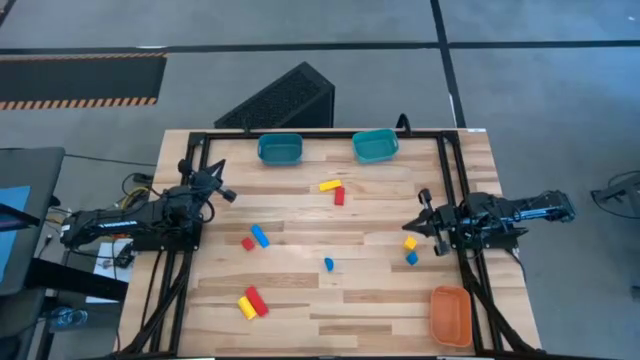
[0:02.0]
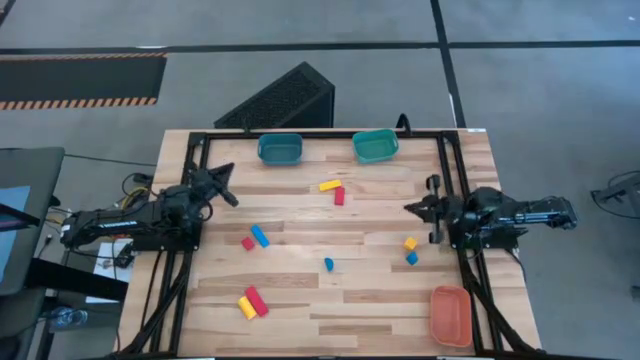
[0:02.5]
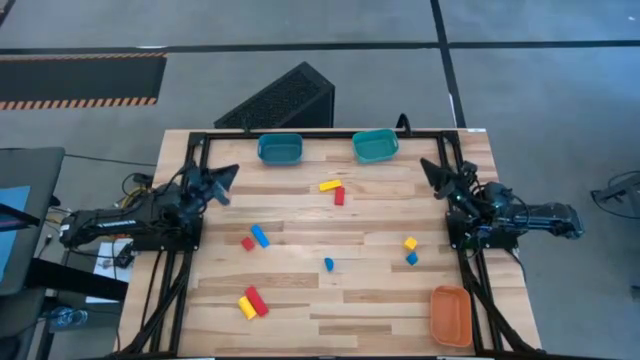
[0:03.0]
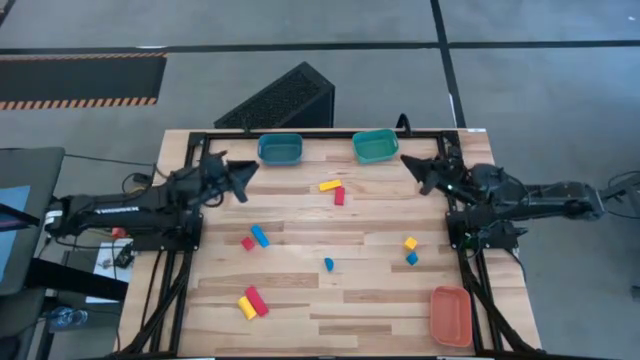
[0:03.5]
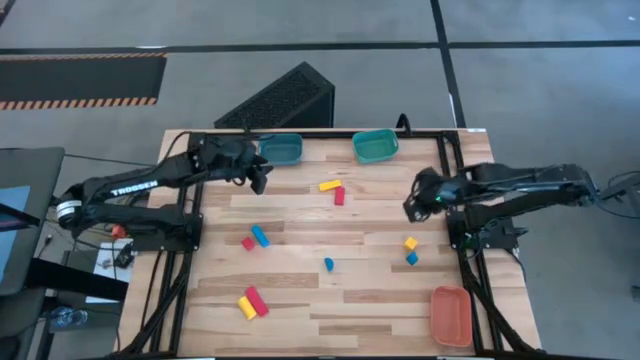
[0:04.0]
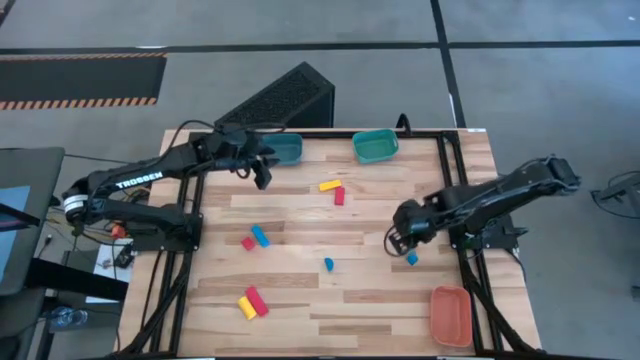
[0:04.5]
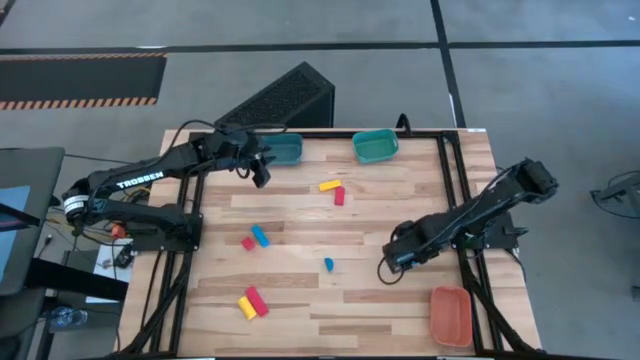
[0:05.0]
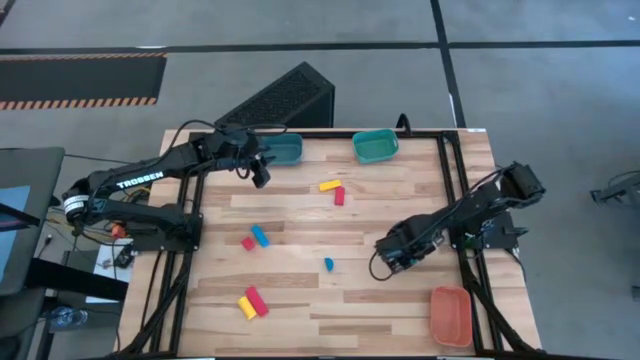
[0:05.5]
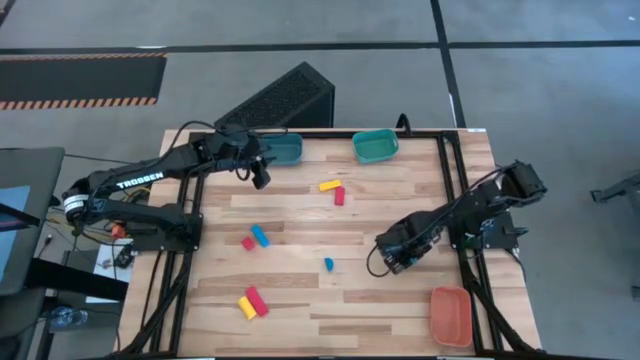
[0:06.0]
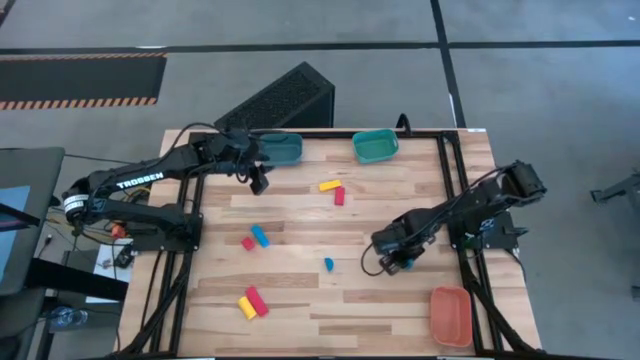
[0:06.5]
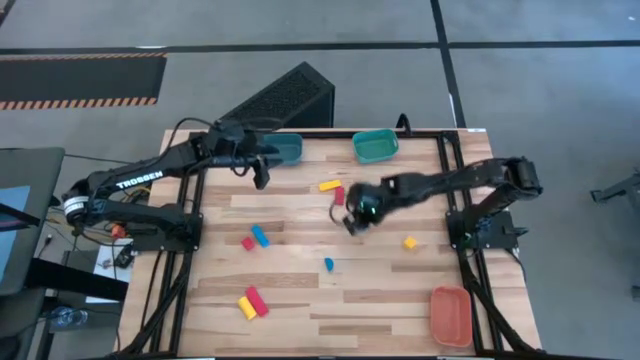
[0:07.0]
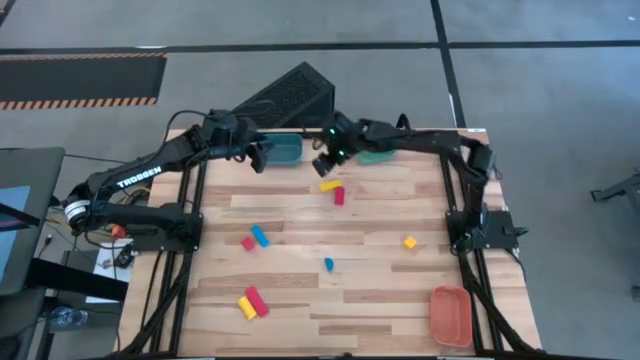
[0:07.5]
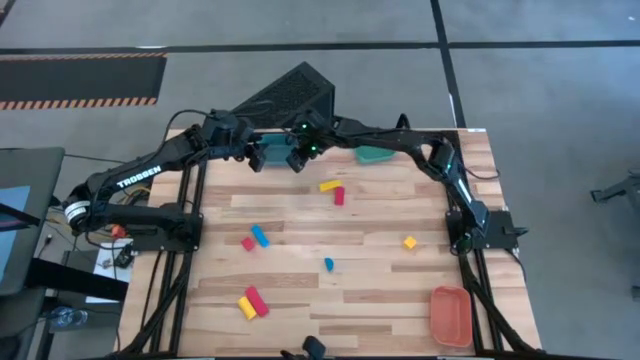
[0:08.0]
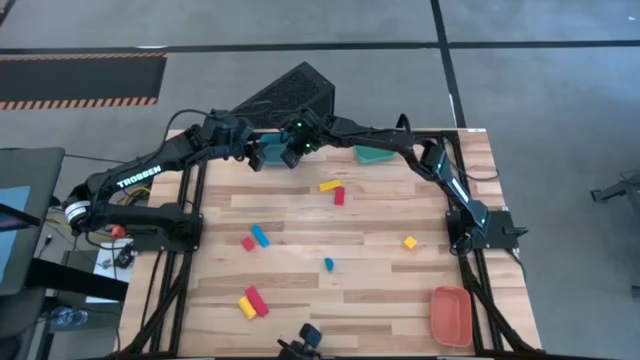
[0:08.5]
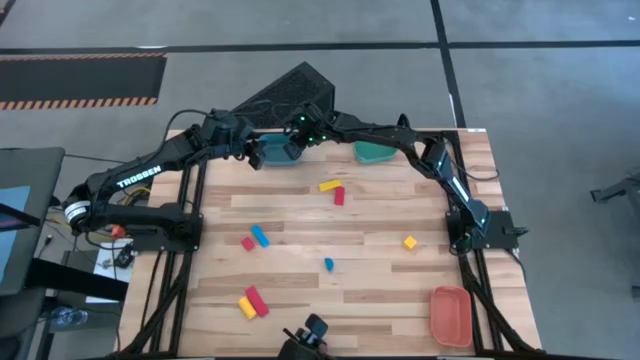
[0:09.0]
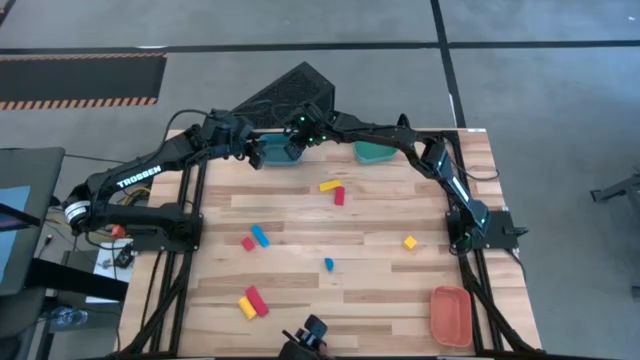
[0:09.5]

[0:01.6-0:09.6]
Task: Sort & place blocks by color
Put the right blue block into the blue bin

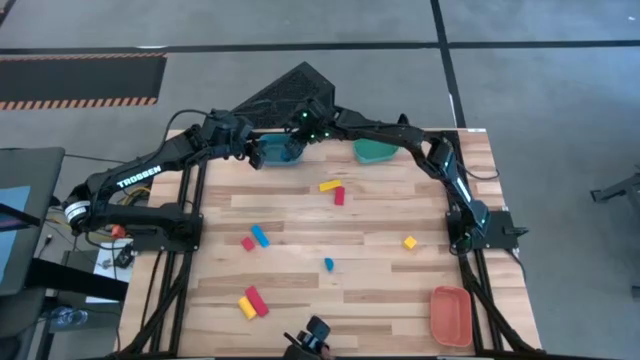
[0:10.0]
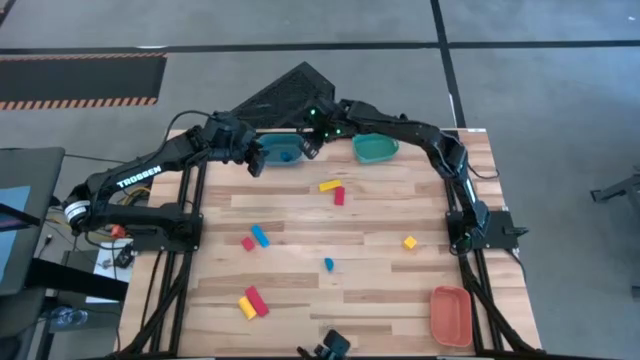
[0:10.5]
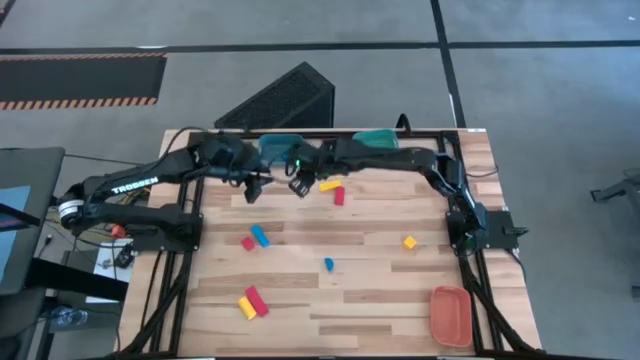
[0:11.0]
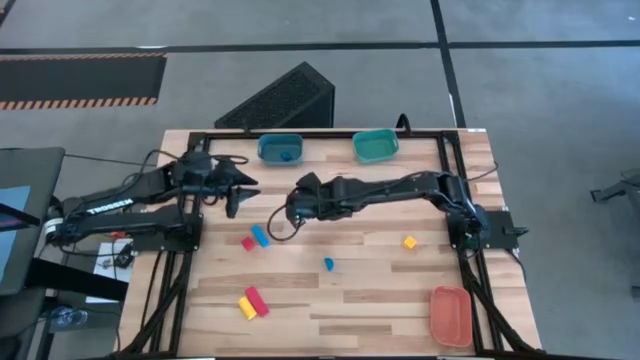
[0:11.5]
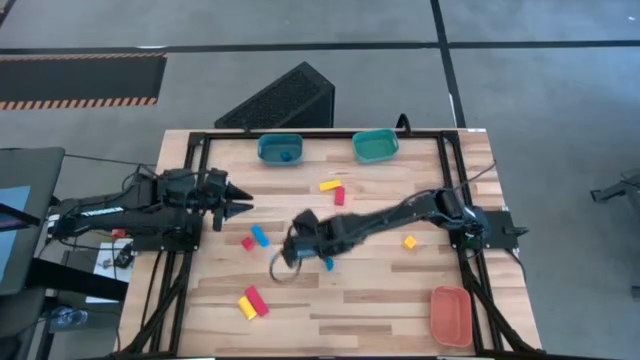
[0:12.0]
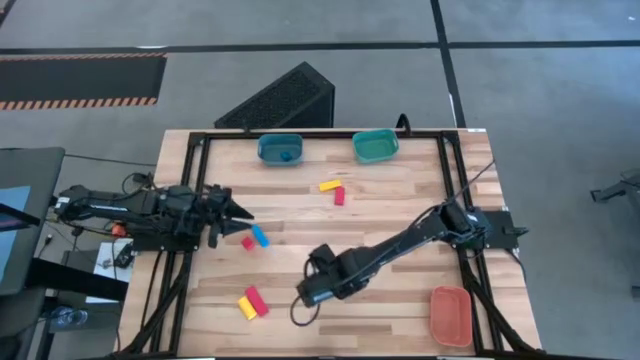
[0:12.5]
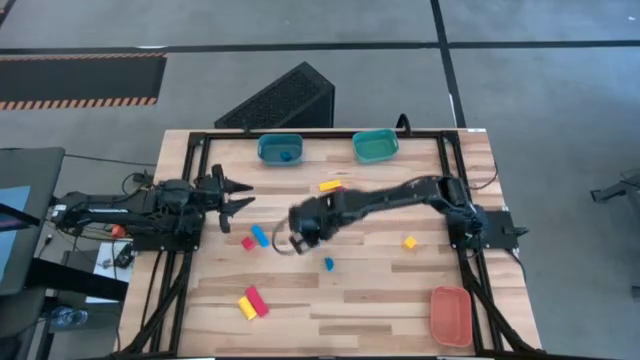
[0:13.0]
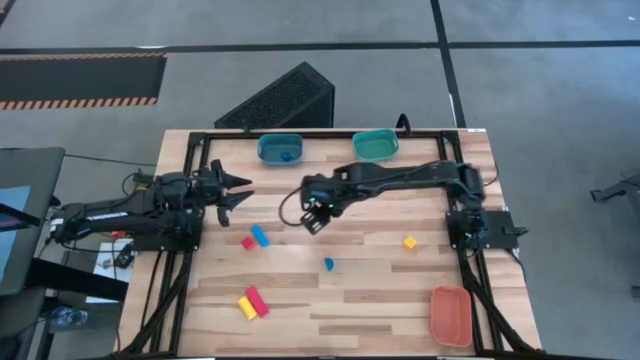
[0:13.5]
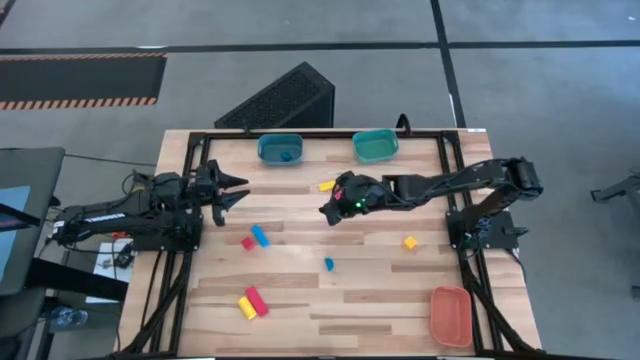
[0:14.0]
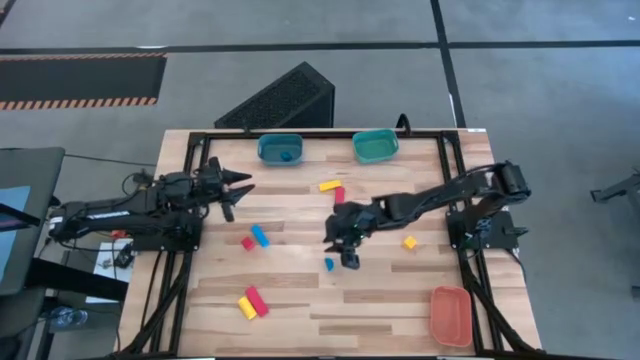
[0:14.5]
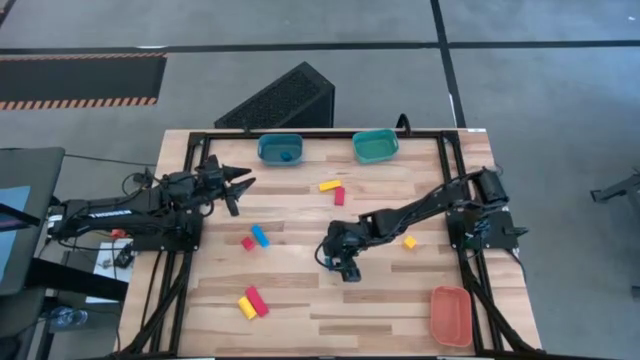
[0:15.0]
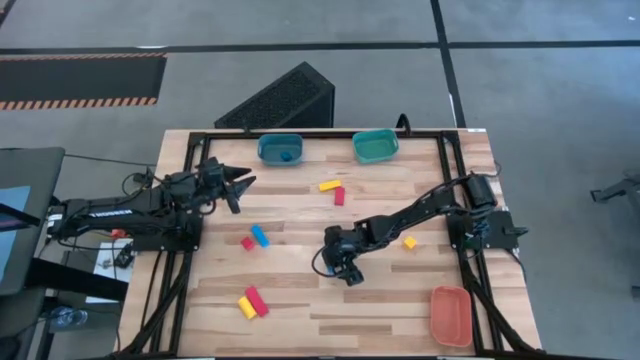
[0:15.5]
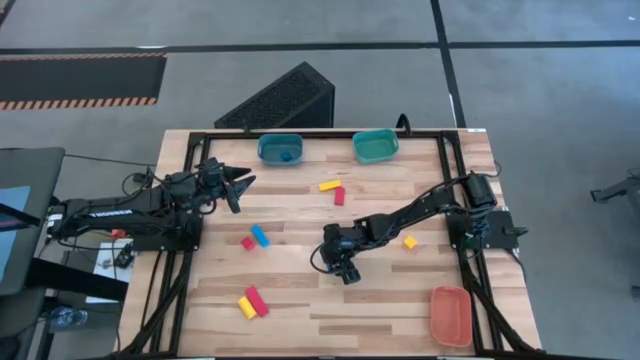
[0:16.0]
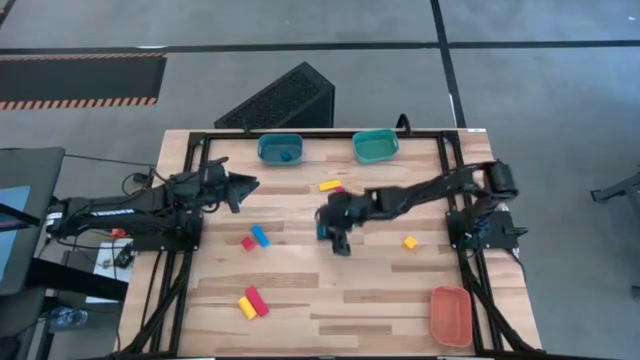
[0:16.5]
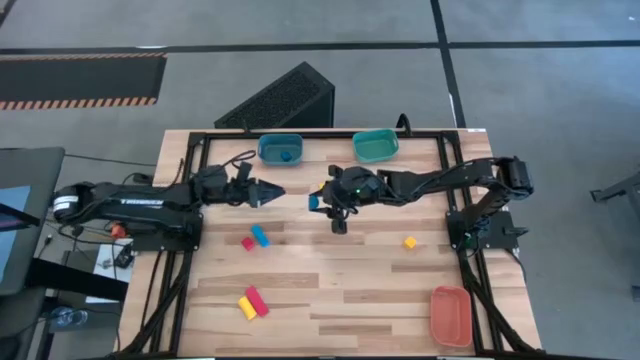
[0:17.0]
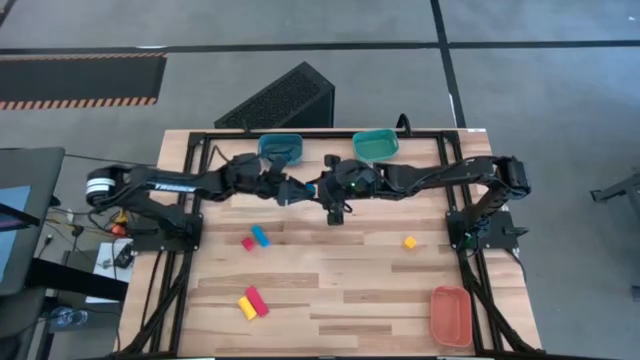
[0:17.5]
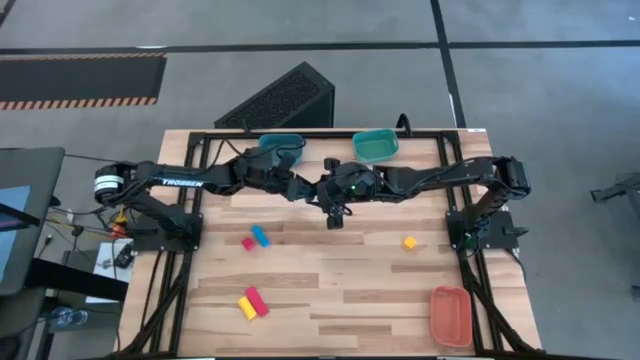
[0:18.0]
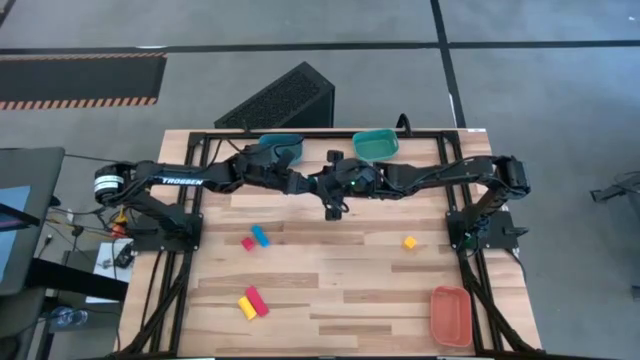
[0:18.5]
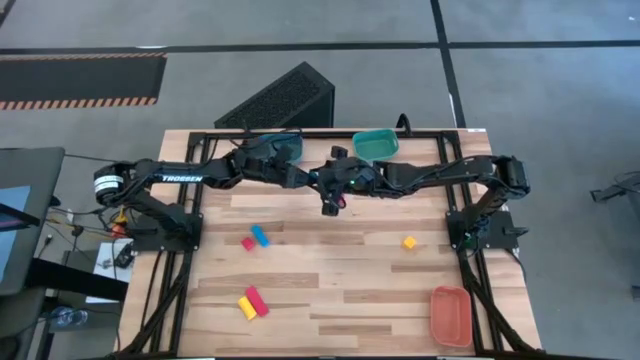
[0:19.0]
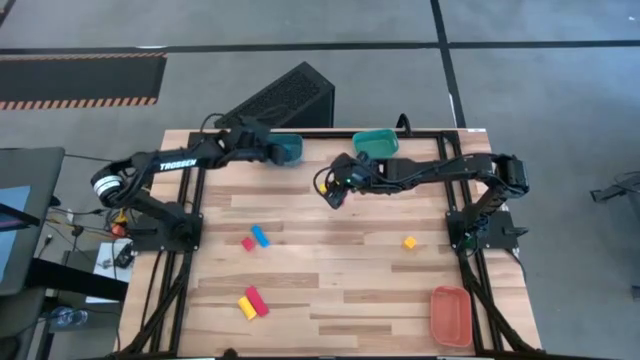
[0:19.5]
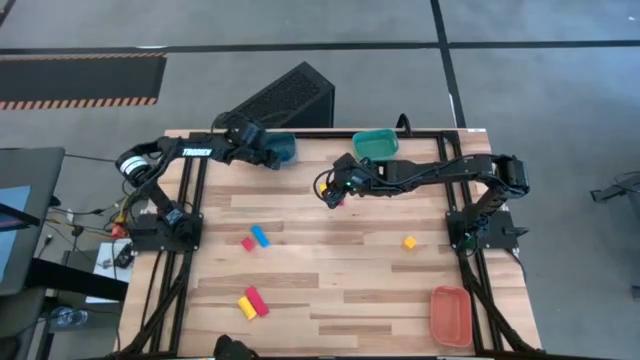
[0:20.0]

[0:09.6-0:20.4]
Put the right blue block into the blue bin

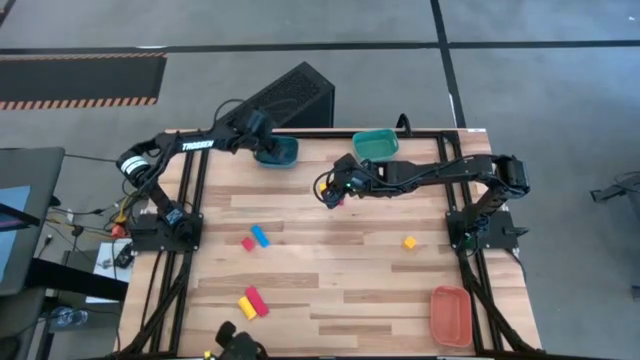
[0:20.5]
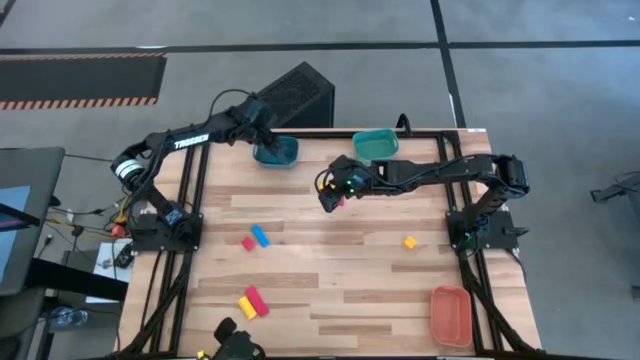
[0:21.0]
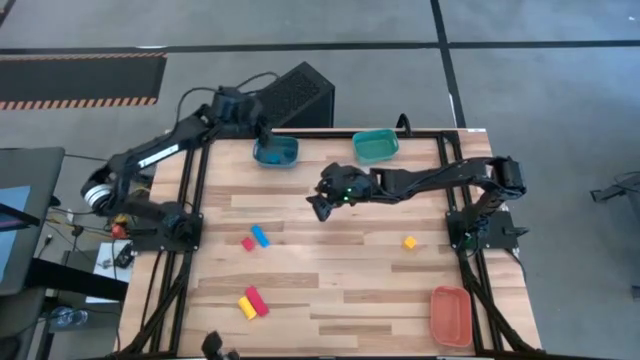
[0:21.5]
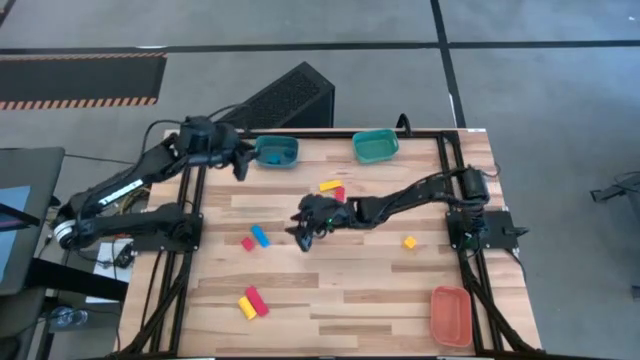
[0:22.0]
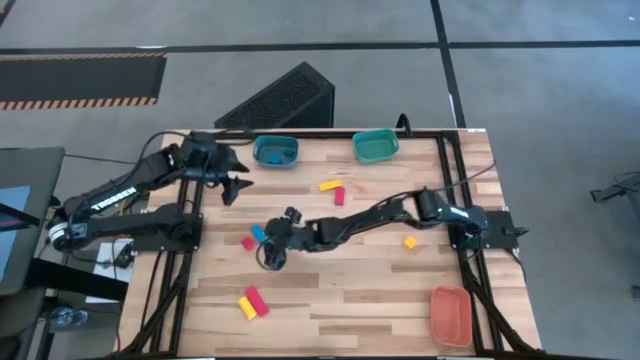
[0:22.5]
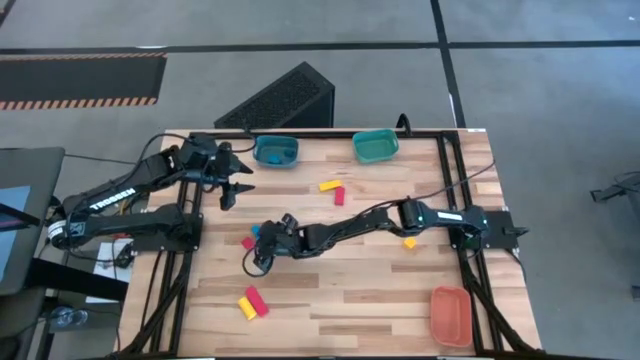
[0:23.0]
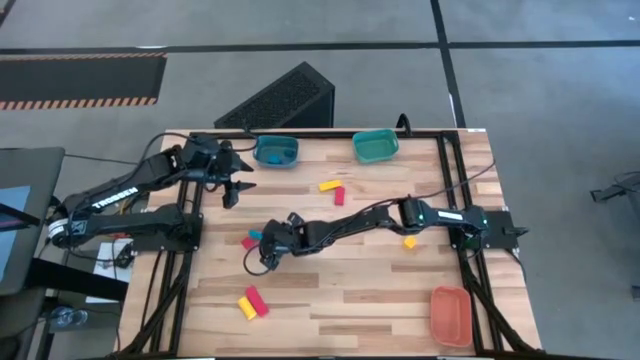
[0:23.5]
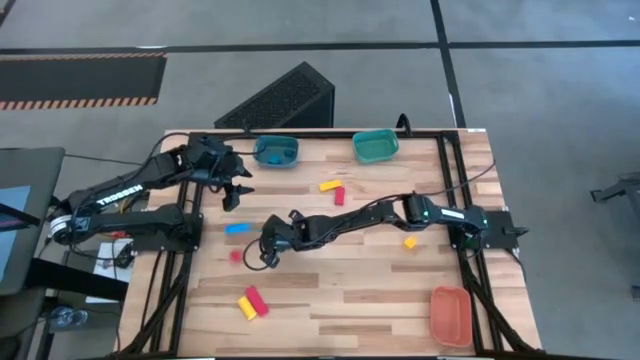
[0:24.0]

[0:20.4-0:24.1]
Put the blue block into the blue bin
